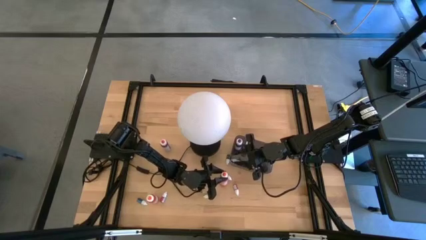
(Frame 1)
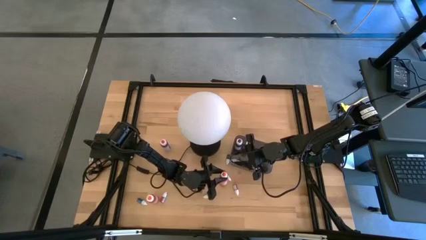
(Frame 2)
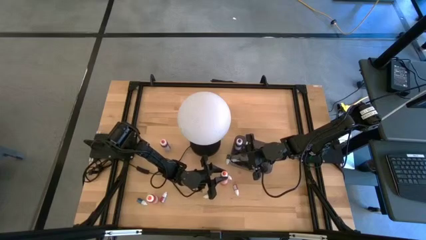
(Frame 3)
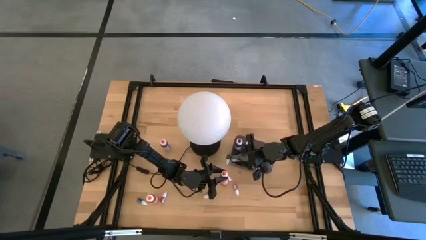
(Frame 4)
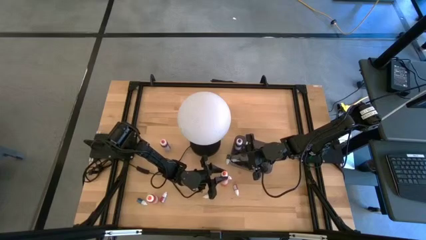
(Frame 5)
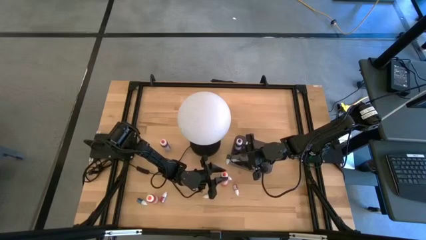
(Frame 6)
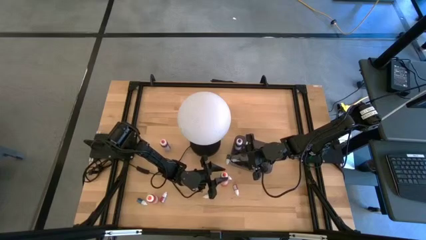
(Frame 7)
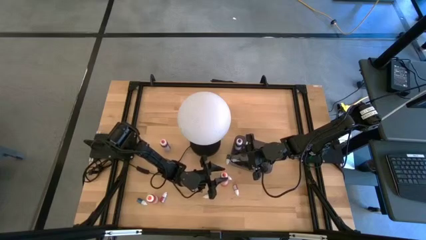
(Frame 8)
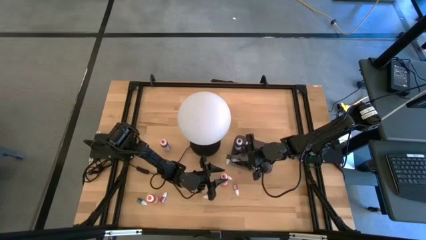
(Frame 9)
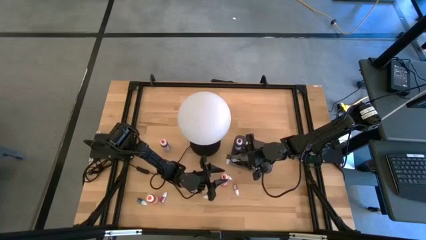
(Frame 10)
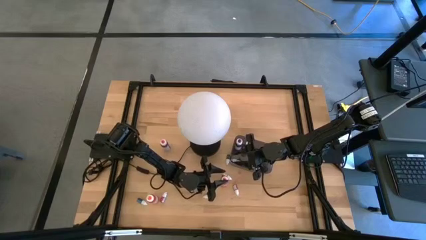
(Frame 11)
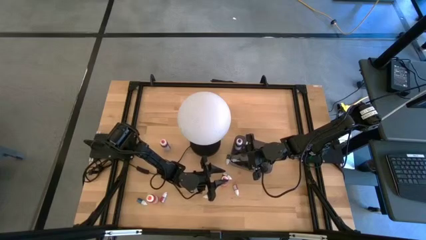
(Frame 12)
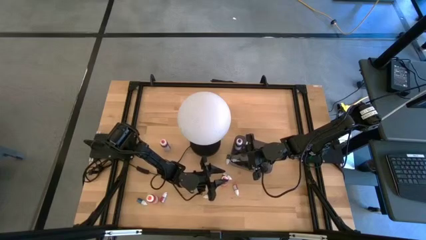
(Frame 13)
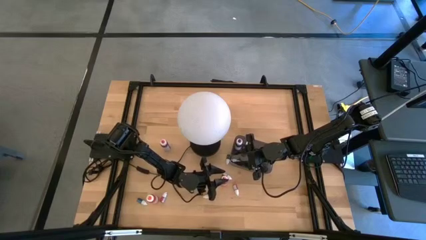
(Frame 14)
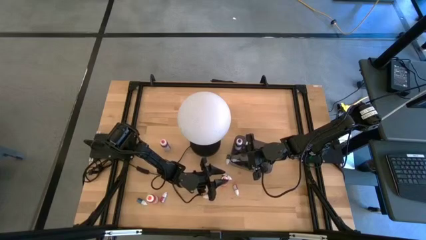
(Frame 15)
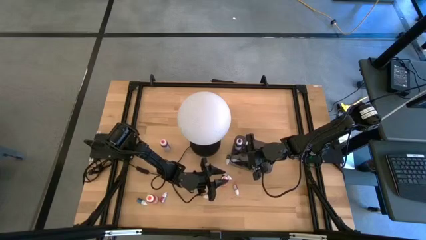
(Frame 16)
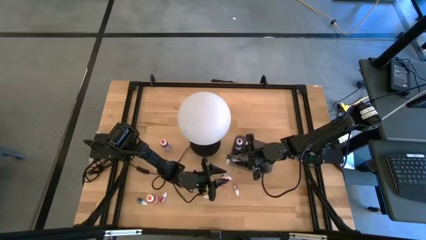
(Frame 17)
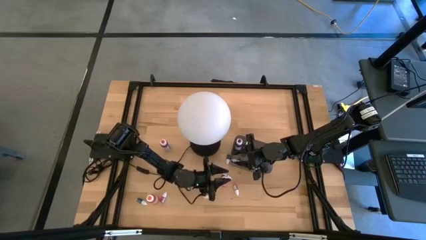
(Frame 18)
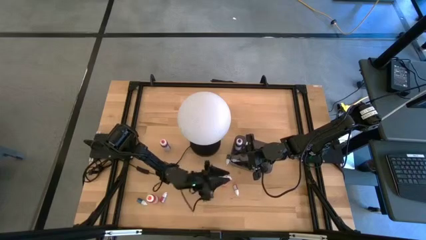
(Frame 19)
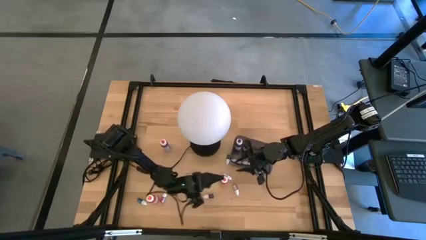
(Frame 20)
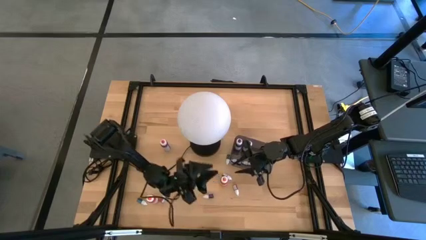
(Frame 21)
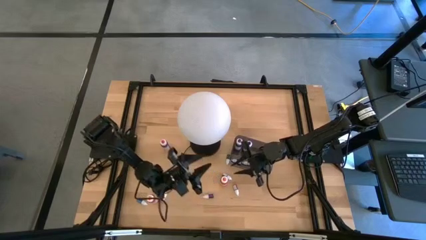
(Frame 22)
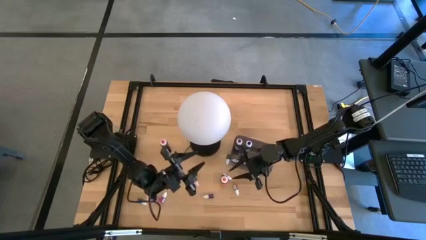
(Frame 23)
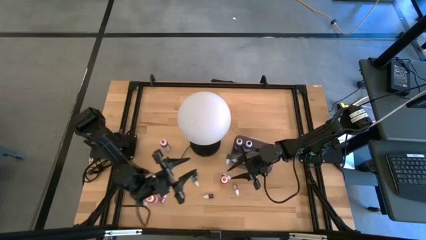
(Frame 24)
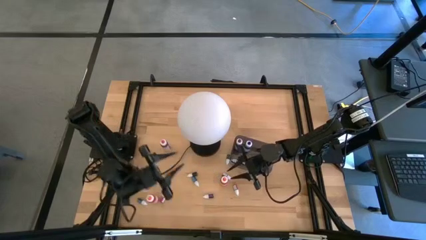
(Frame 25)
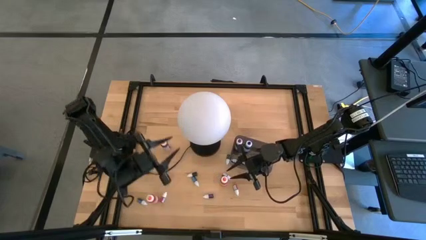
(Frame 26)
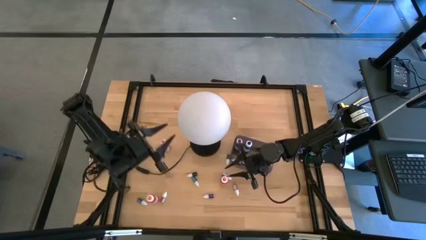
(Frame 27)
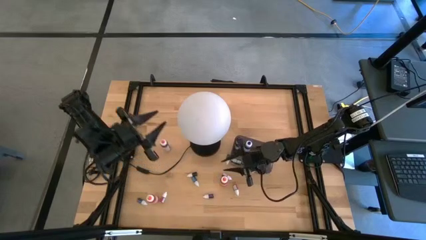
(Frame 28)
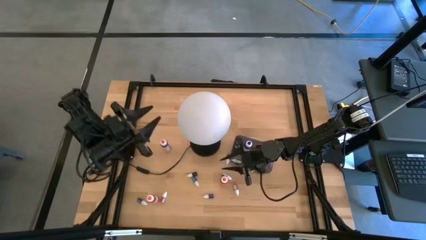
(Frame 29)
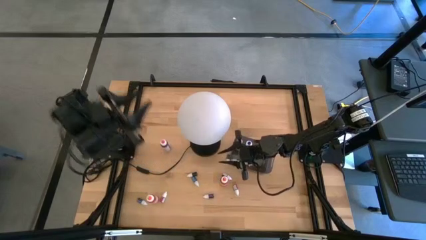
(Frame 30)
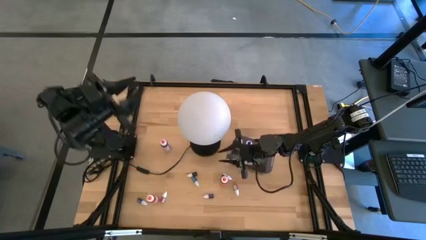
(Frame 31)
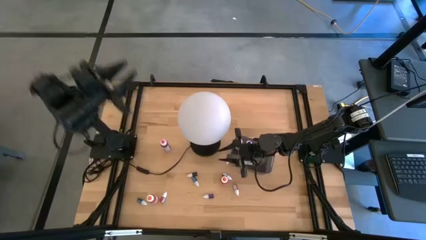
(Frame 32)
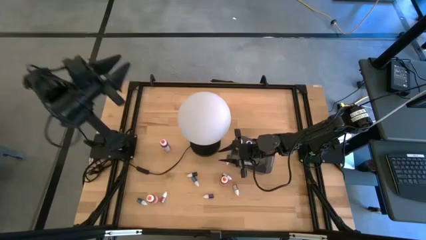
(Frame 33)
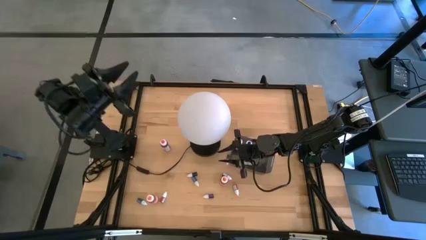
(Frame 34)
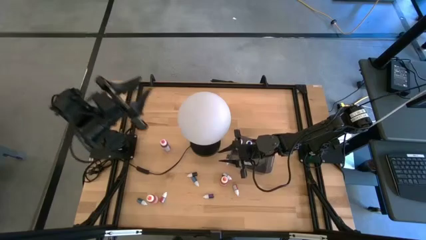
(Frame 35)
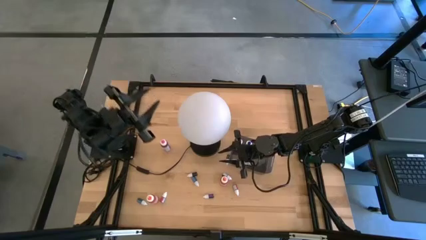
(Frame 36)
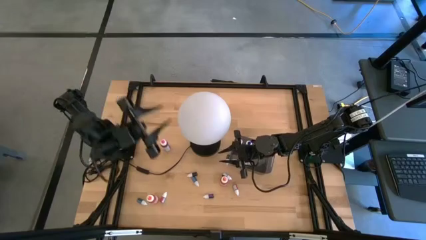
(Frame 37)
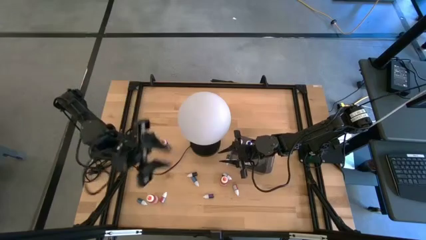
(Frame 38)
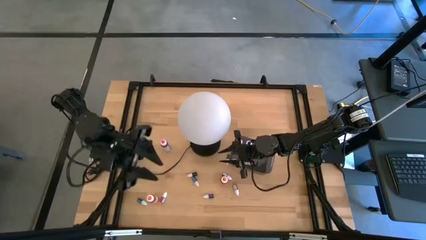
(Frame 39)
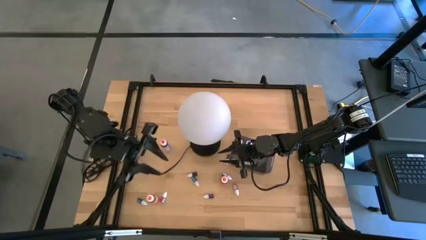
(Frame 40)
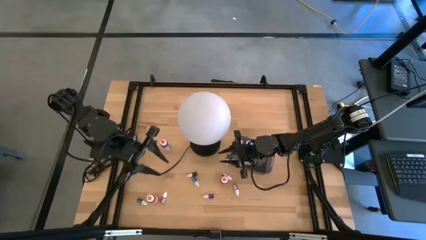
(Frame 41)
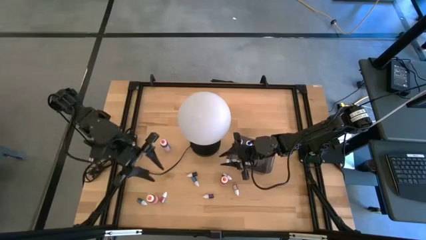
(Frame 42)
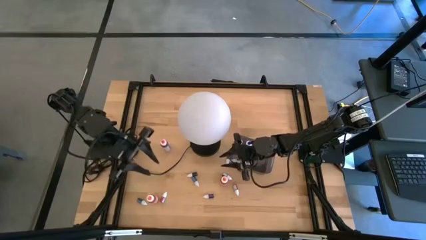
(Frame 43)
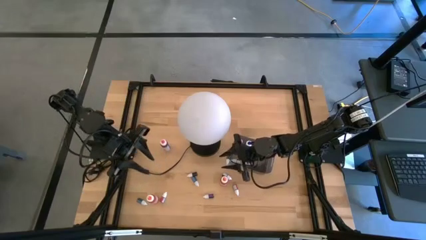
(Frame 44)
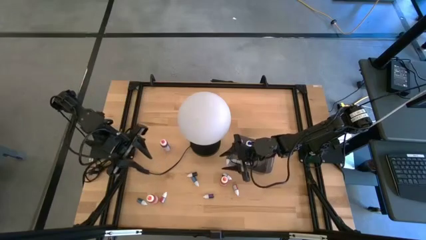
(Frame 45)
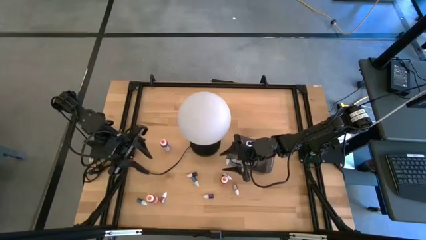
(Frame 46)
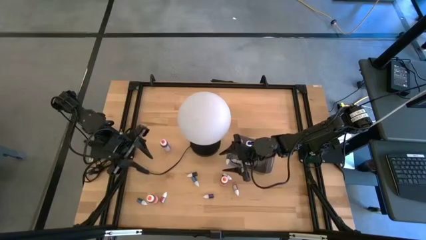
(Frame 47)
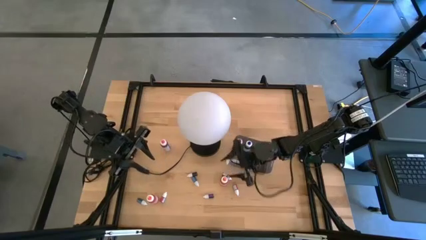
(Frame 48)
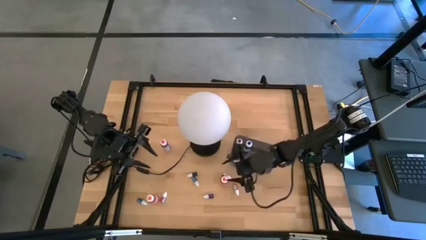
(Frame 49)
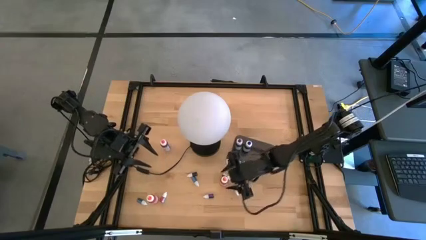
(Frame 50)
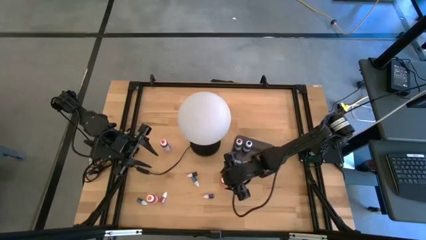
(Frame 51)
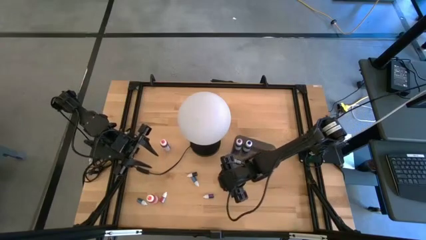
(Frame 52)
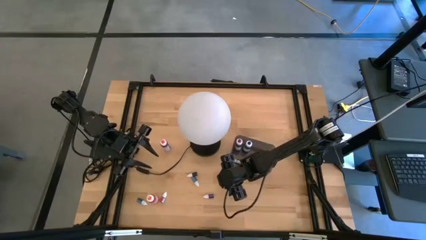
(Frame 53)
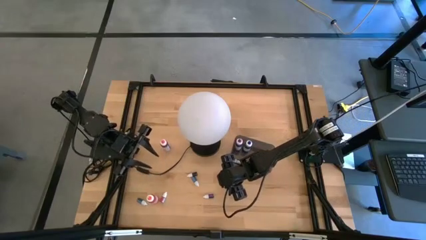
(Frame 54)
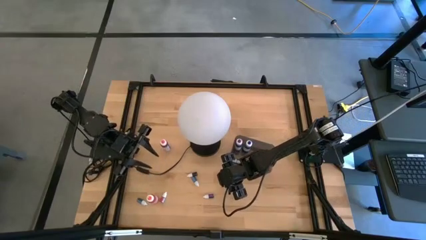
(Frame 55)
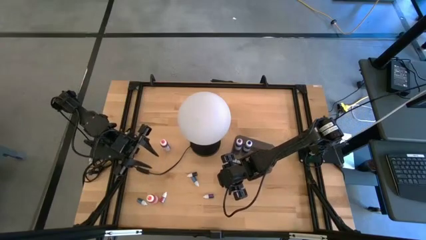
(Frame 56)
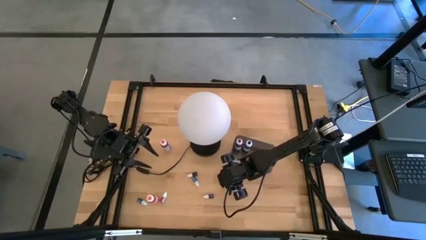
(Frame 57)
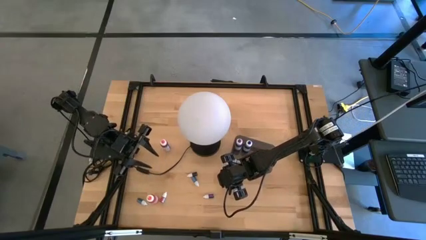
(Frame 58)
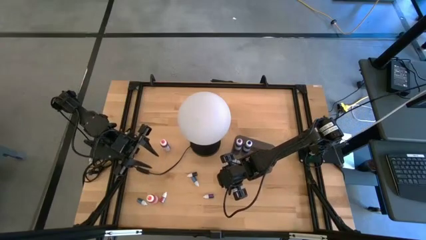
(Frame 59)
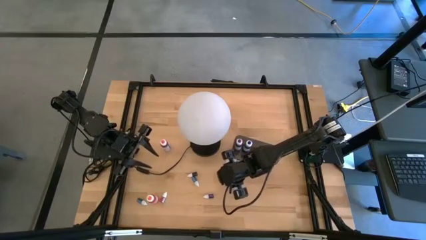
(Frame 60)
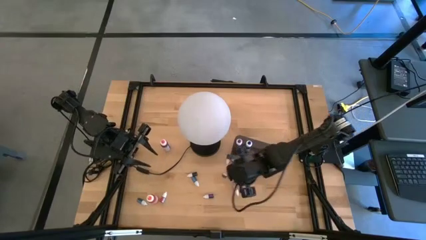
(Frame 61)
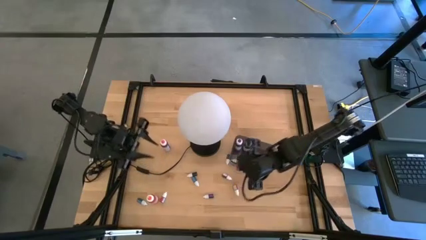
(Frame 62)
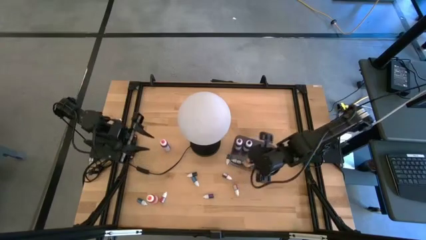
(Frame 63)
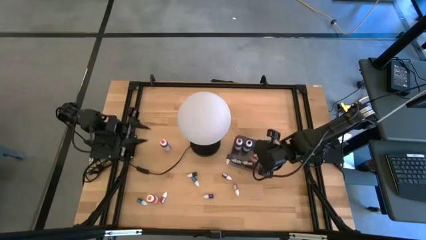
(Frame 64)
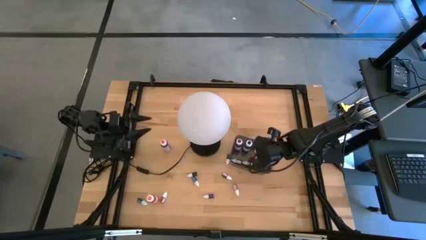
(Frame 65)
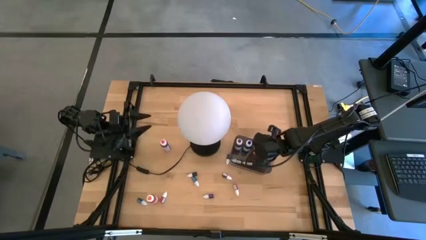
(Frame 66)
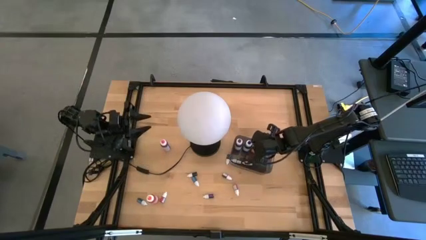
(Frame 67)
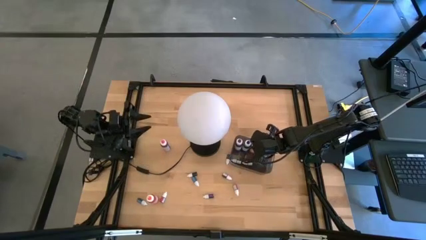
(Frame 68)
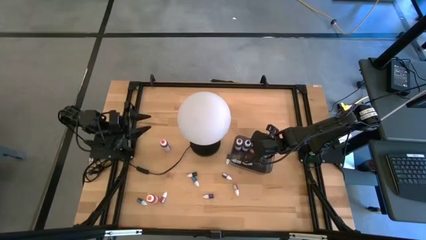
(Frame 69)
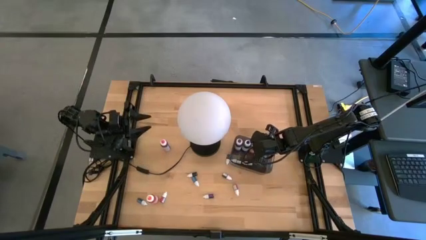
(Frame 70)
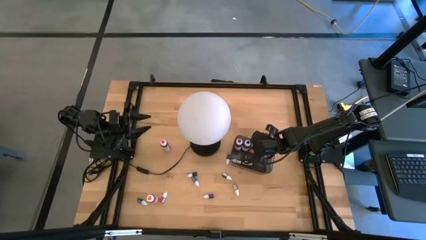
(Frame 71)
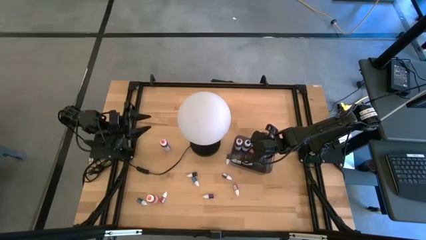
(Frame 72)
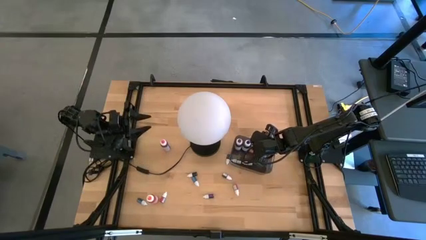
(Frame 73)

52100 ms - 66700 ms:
Task: Pick & Place food coloring
Put the top large orange food coloring bottle into the black container
